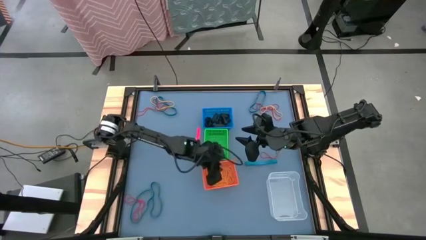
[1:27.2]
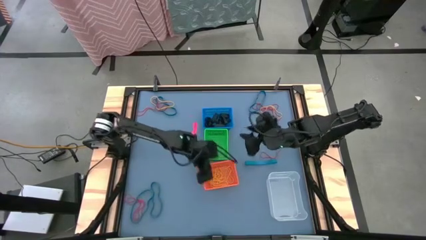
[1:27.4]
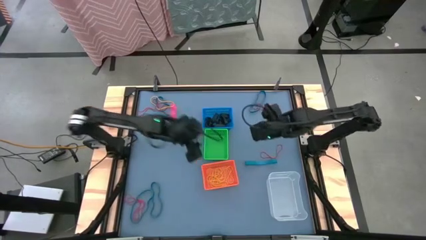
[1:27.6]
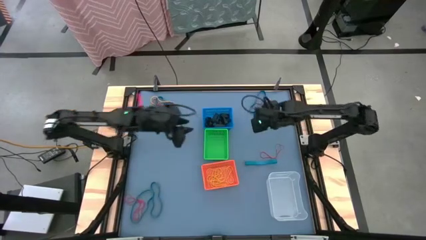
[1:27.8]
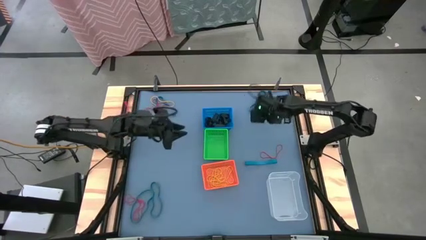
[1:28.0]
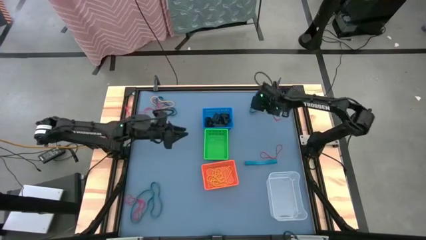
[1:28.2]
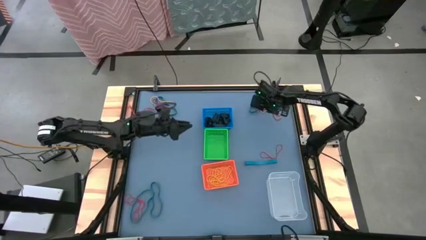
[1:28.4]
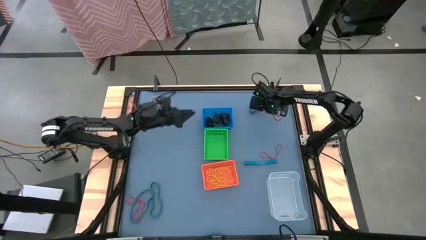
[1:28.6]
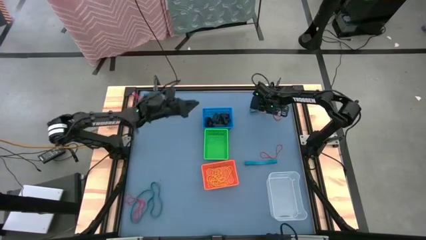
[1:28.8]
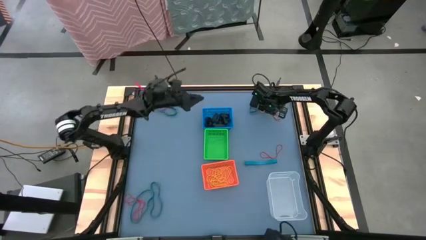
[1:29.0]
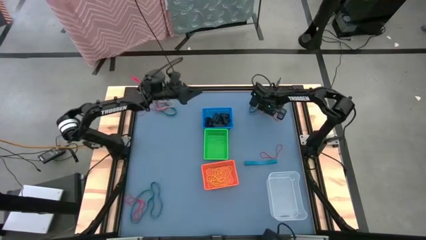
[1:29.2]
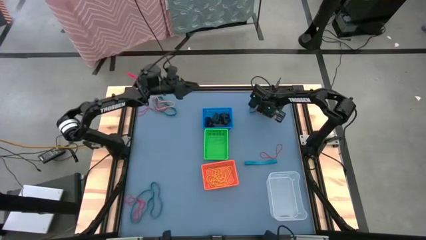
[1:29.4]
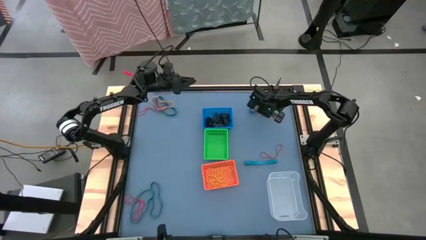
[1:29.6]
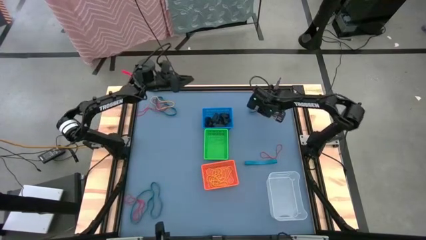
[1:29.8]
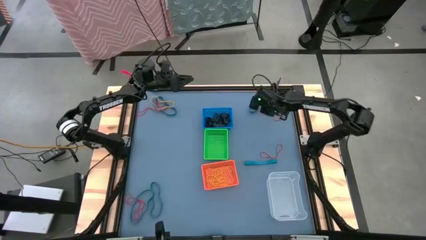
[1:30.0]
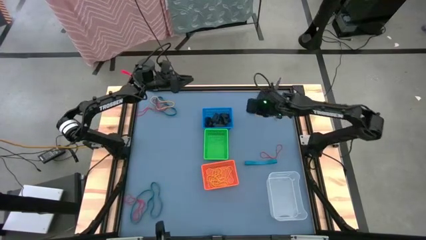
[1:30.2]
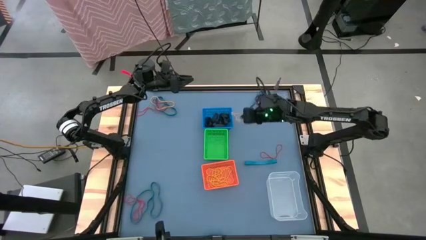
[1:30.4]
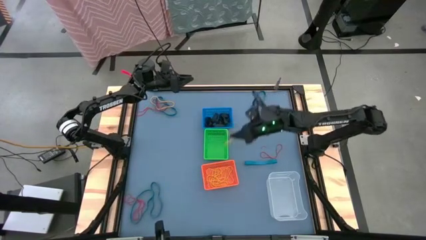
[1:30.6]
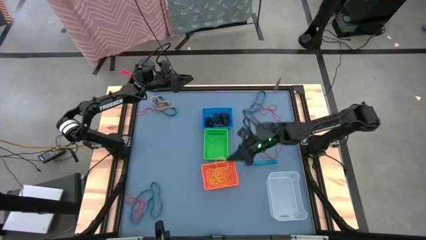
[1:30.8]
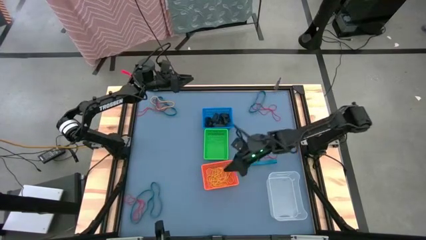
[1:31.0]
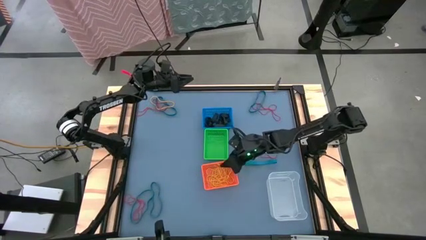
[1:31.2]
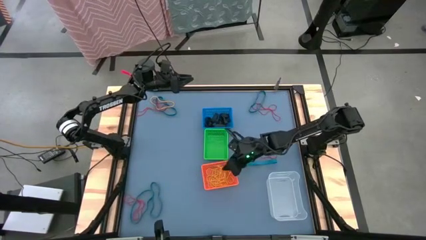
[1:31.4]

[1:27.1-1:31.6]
Task: Sort rubber bands into baskets
Put the yellow rubber band into the orange bin

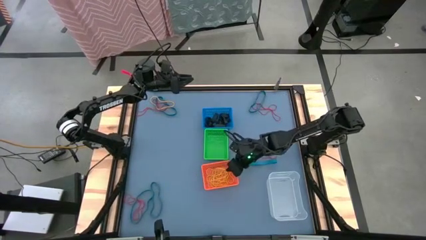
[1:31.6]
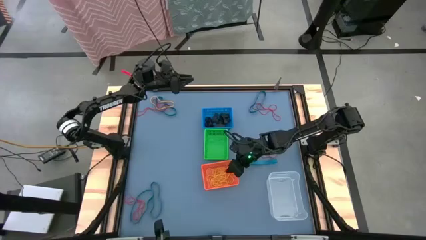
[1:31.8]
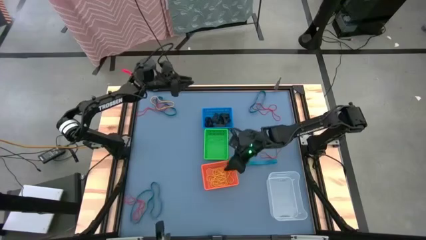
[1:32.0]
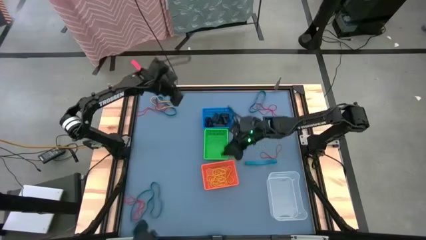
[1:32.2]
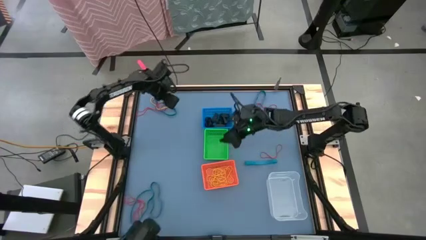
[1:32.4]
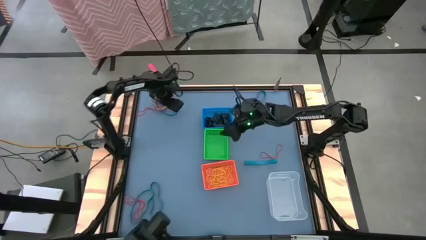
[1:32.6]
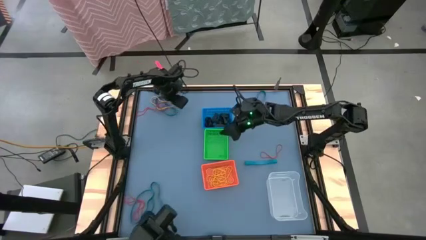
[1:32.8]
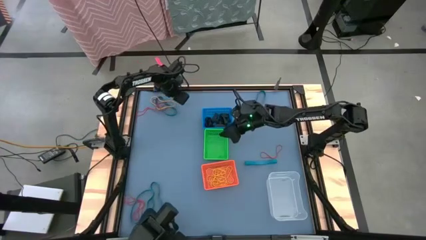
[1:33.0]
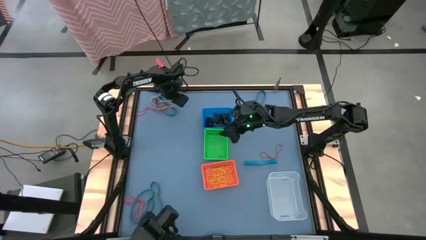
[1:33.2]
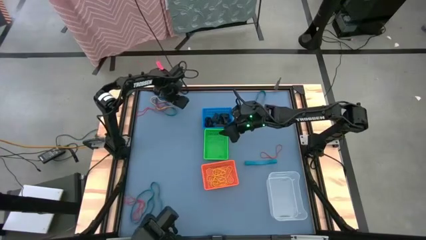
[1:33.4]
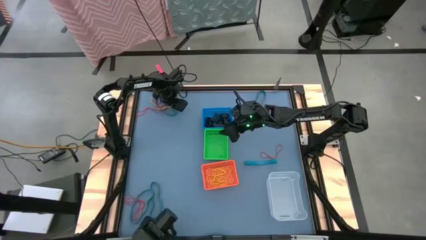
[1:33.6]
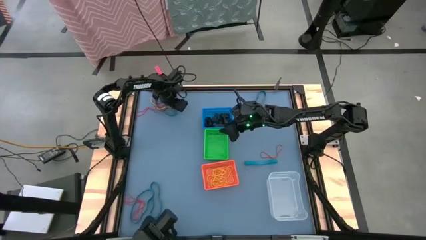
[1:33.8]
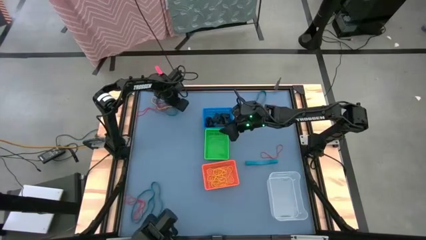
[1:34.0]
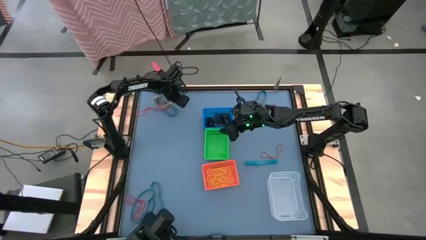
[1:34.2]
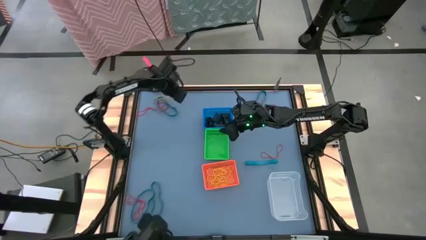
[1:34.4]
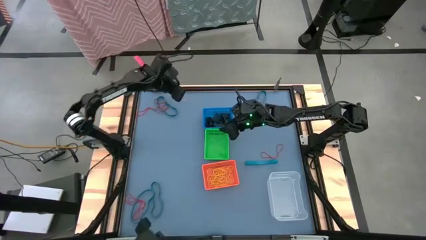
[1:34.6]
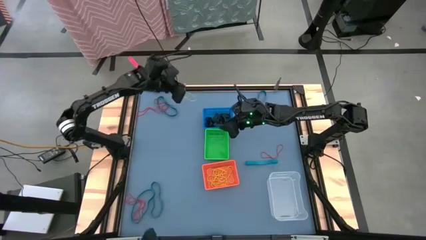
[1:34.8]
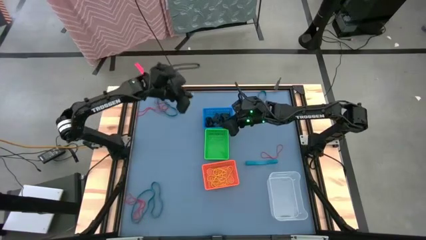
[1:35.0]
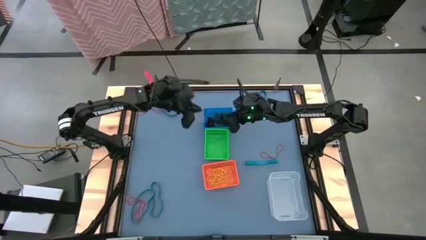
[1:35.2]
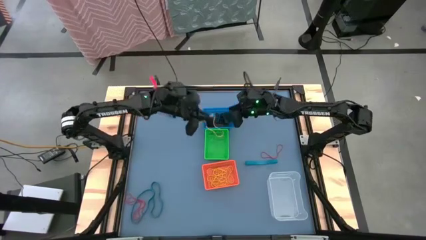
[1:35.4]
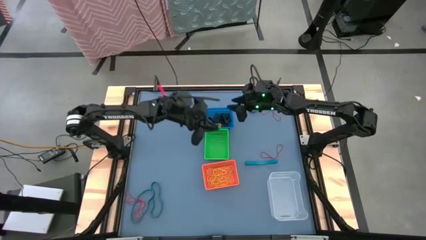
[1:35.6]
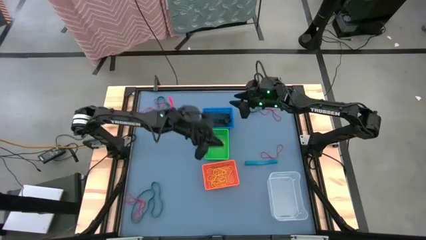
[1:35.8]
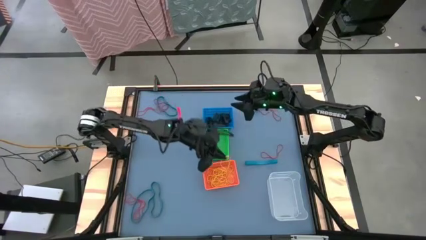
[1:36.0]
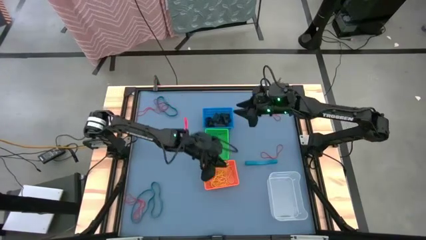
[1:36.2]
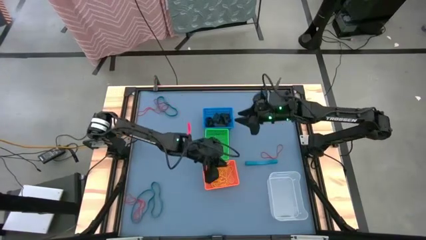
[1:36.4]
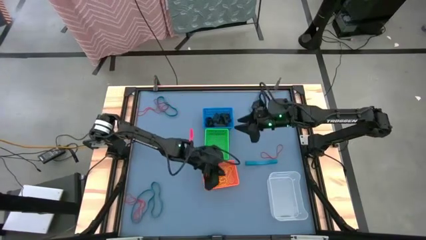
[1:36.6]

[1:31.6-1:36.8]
Put the yellow rubber band into the orange bin

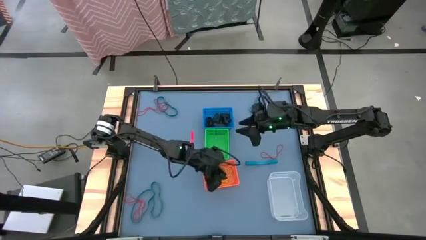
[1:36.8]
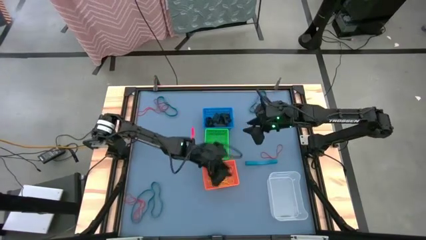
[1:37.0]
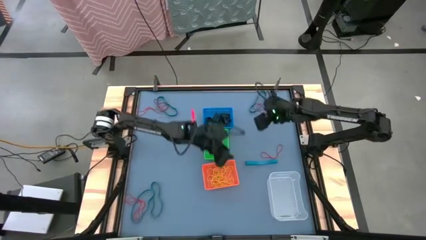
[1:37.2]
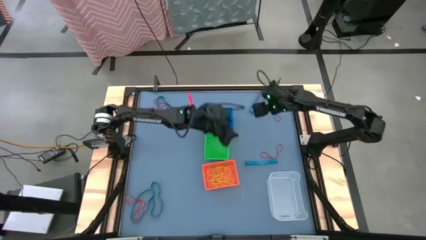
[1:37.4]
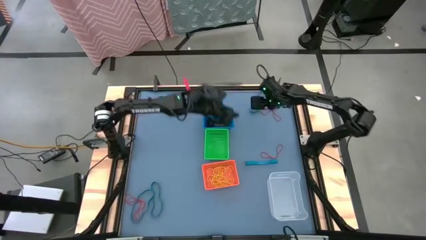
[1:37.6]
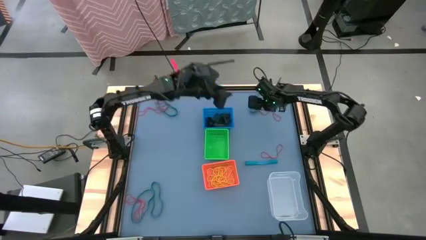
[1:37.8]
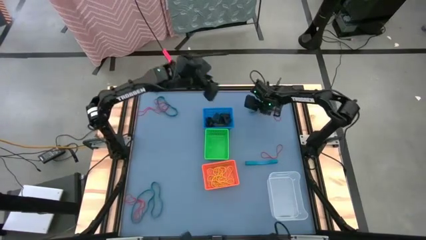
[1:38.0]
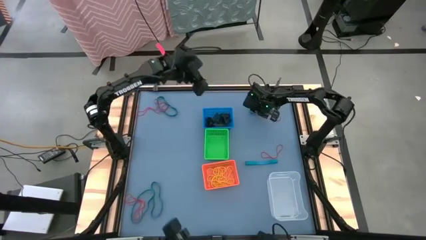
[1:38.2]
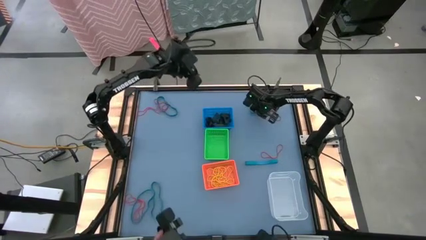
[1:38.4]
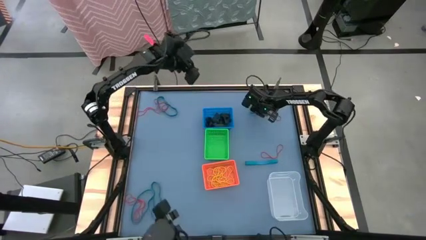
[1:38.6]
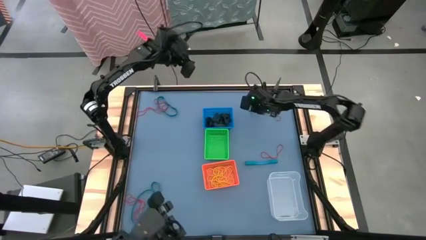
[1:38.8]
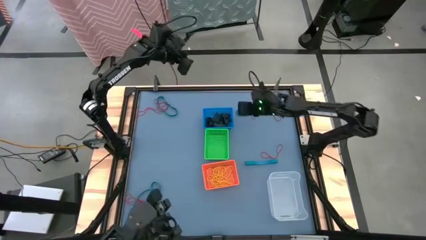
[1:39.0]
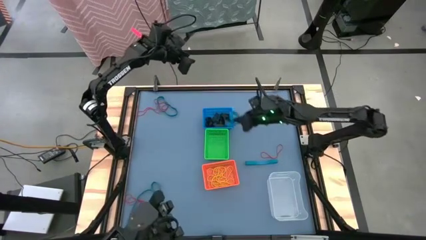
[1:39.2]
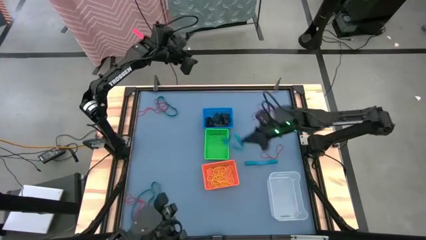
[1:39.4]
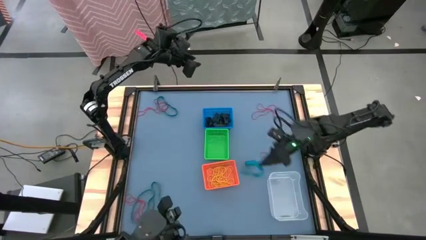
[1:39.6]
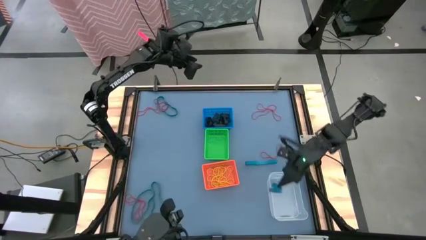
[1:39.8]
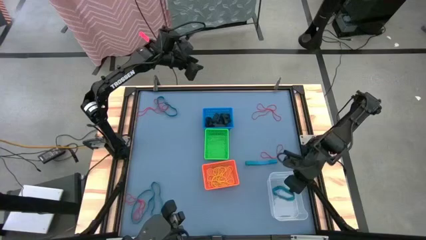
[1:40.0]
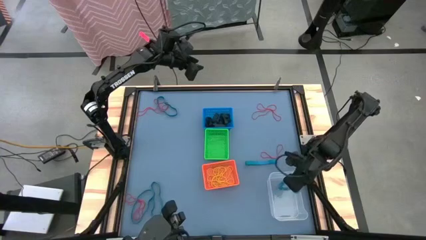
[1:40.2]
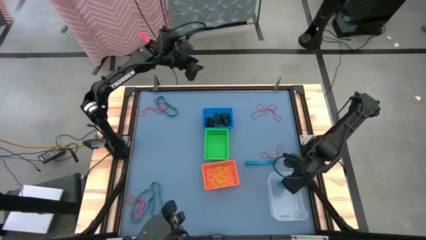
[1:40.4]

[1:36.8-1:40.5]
Put the blue rubber band into the transparent bin

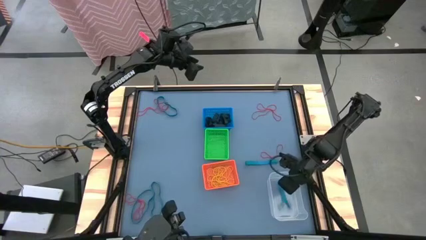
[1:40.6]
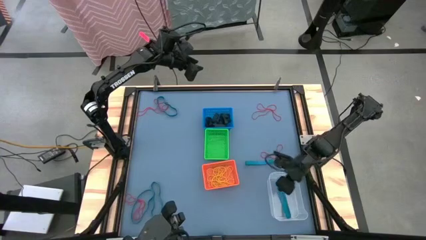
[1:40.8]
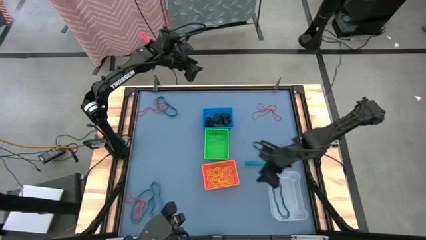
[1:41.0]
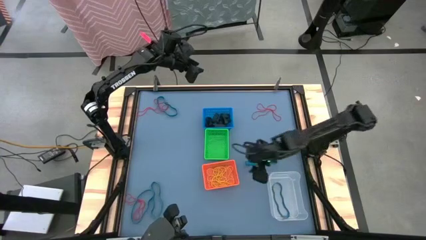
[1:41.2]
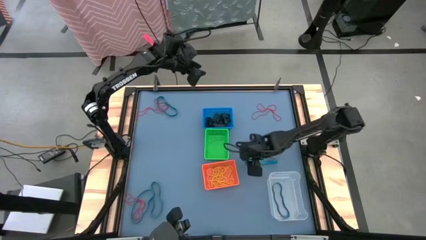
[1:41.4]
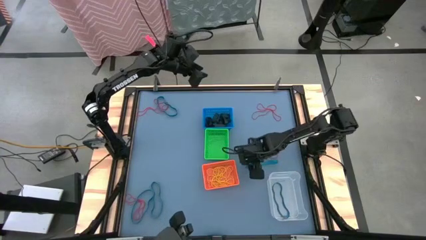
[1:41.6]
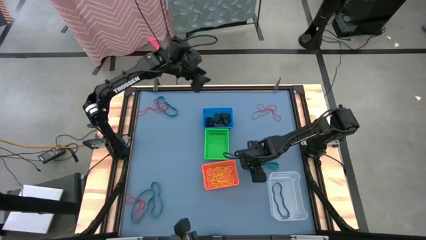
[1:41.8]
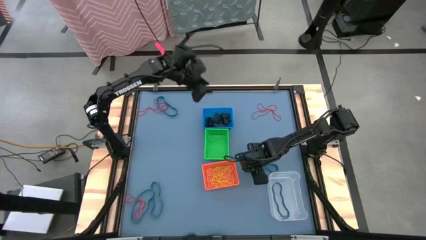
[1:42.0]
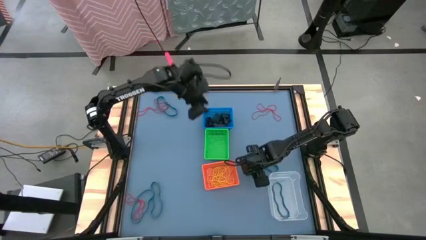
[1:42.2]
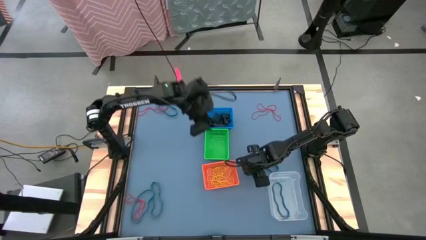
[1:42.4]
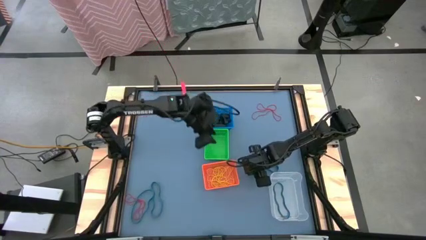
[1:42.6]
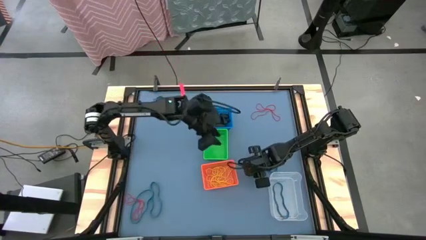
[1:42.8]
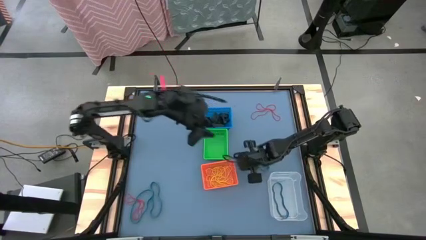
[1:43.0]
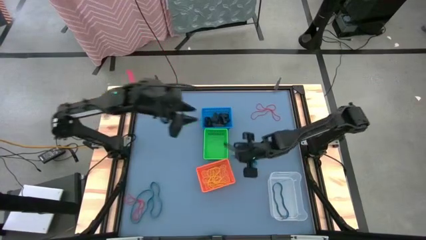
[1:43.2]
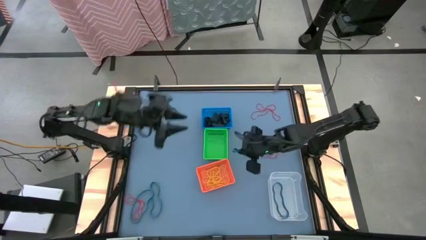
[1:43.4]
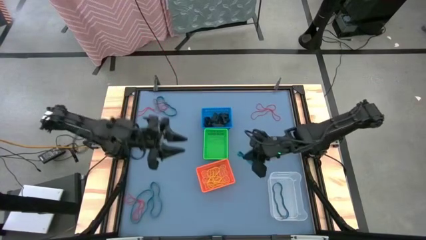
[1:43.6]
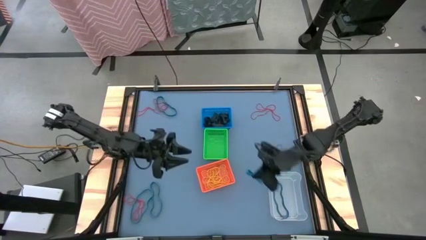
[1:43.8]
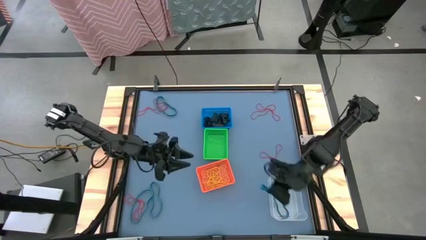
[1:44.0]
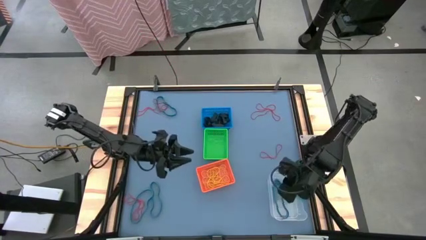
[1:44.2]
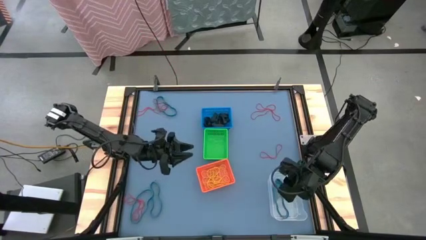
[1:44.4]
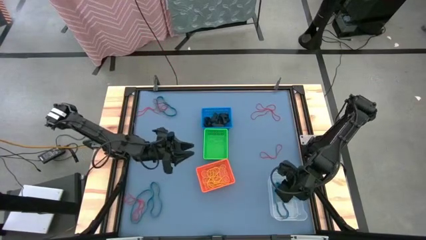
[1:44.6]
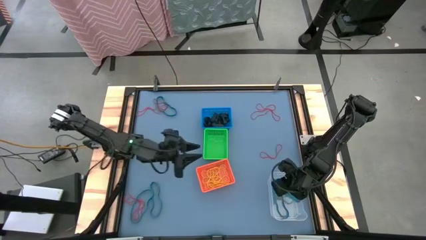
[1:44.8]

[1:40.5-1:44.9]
Put the blue rubber band into the transparent bin
